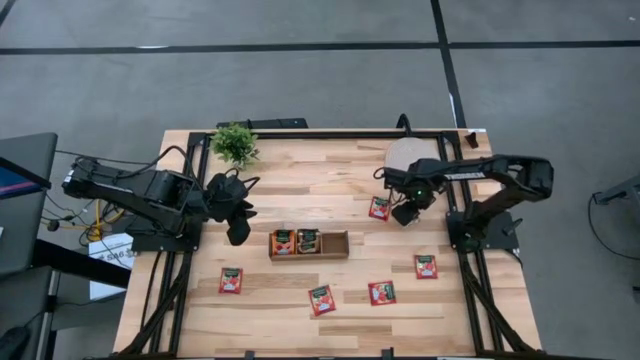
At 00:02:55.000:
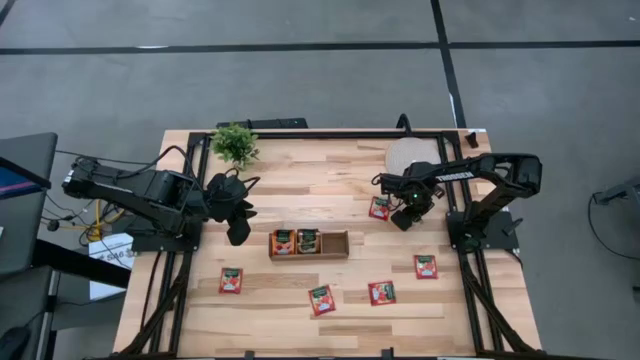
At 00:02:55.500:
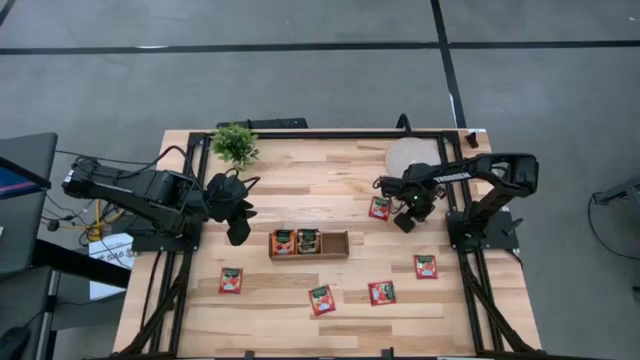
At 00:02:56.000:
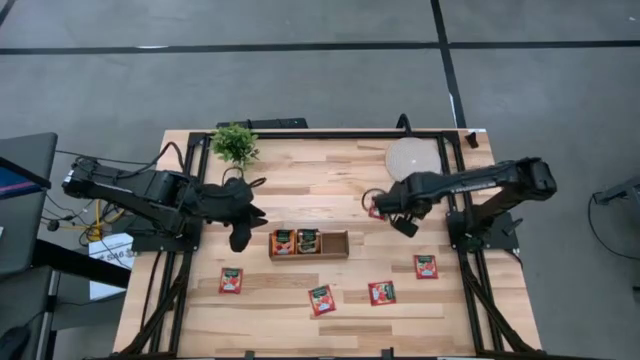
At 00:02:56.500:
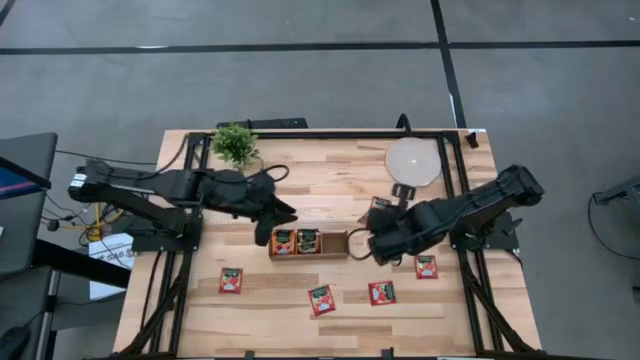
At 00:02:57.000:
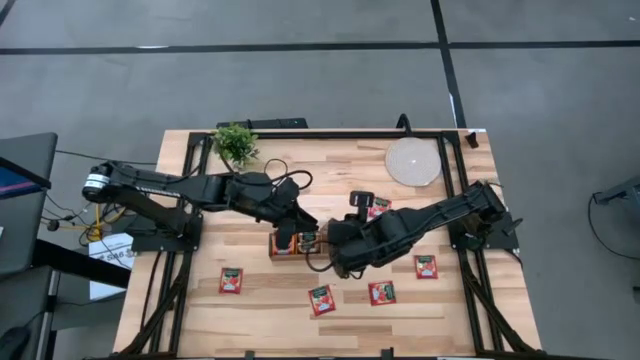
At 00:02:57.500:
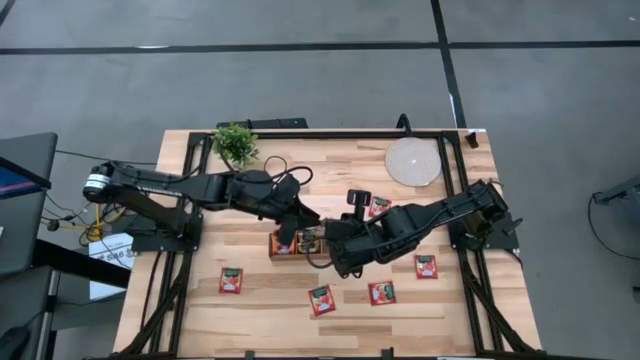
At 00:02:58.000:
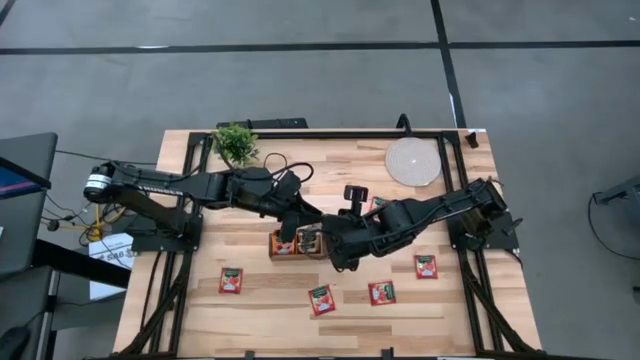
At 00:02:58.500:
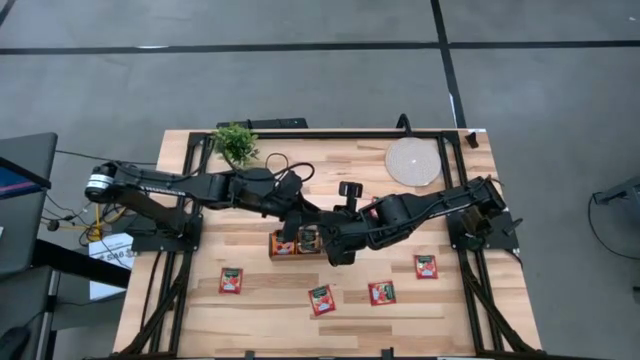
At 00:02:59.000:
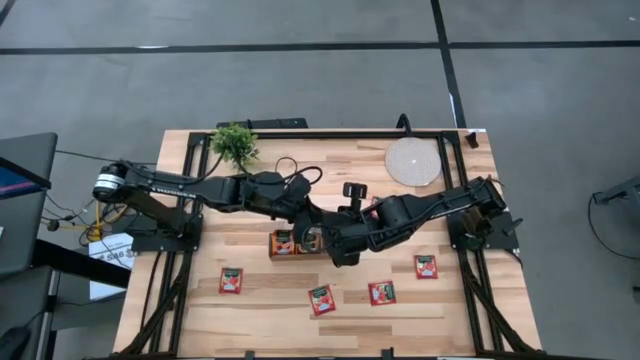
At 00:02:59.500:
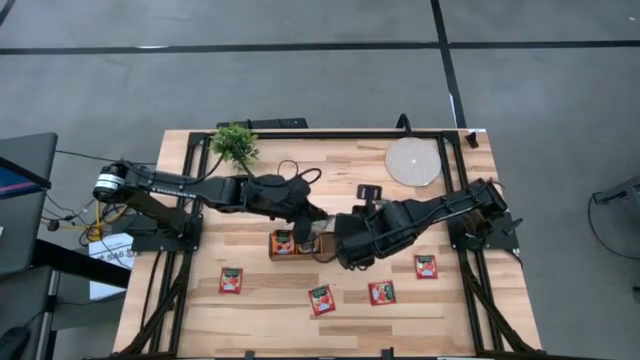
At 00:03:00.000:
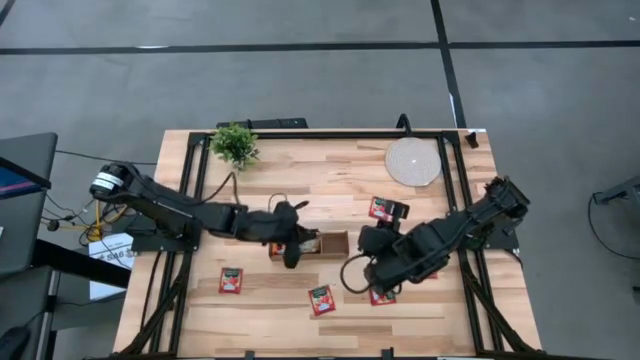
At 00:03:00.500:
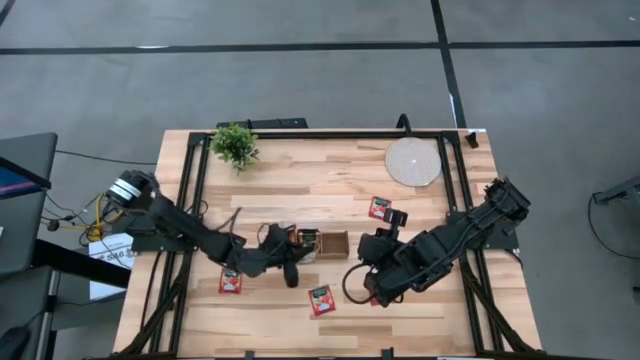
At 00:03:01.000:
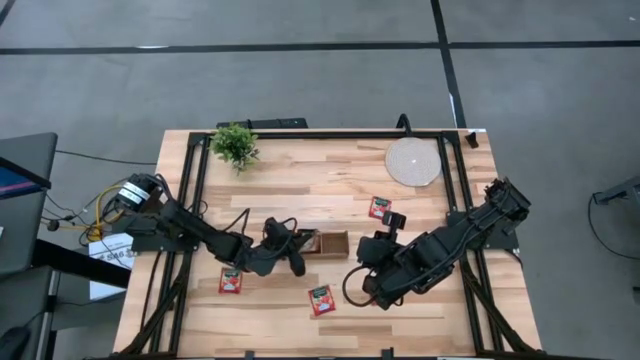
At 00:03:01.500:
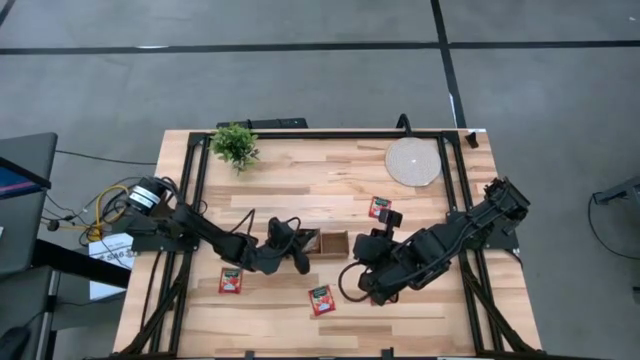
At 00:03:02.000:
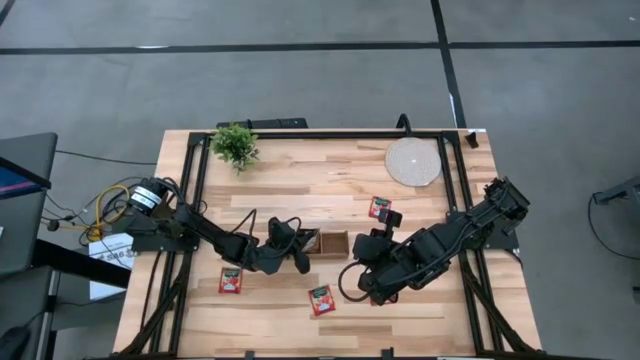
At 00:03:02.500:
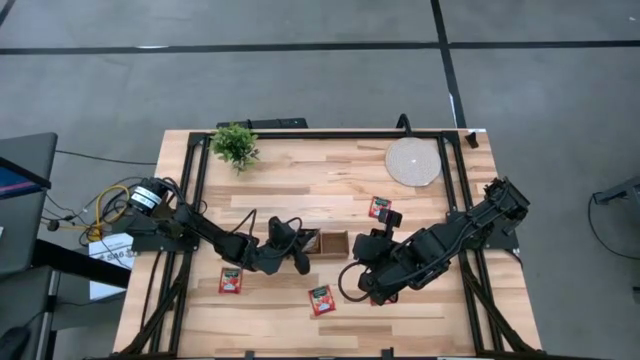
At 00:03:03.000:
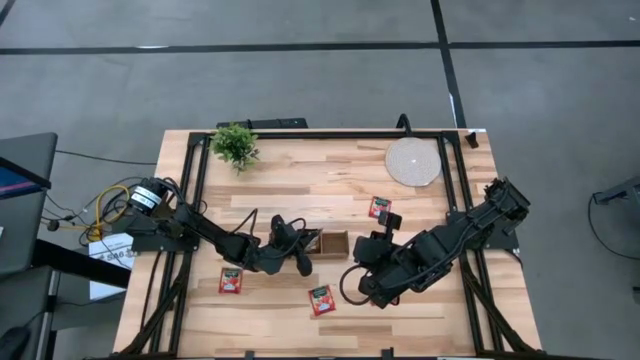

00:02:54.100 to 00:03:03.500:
Task: Pick & Place Tea
Put the brown tea bag into the middle section of the wooden organizer

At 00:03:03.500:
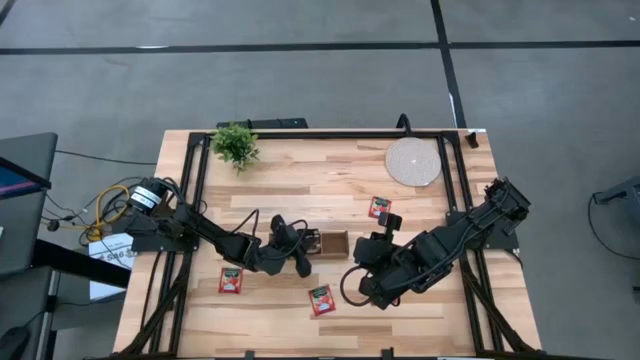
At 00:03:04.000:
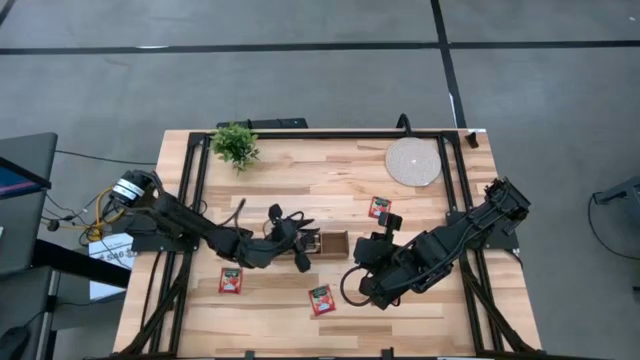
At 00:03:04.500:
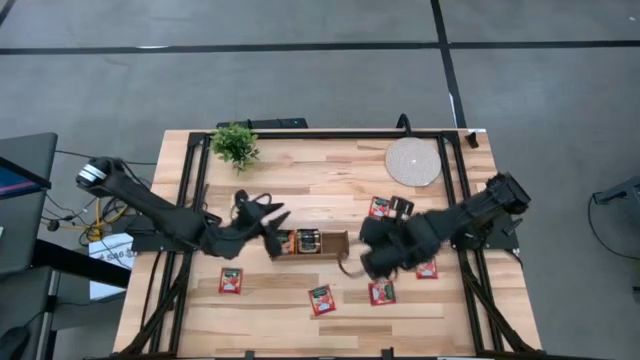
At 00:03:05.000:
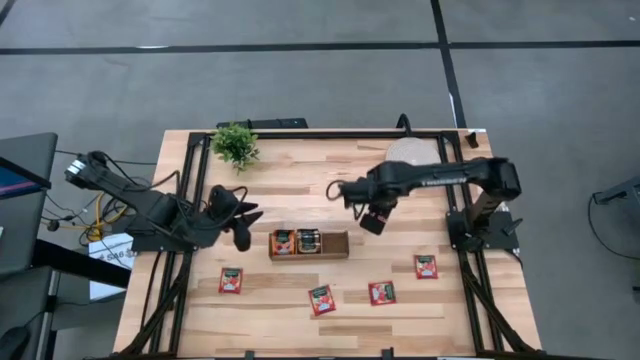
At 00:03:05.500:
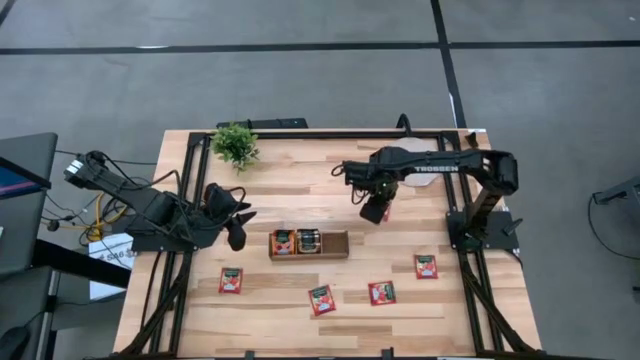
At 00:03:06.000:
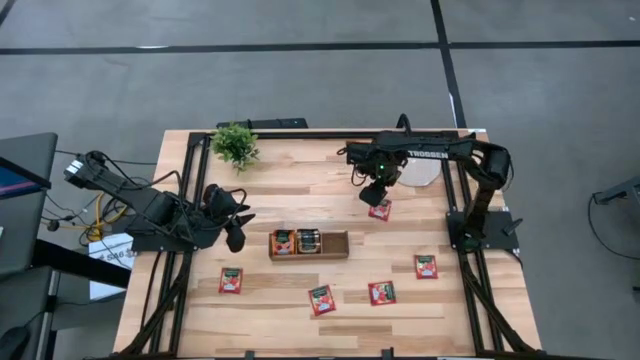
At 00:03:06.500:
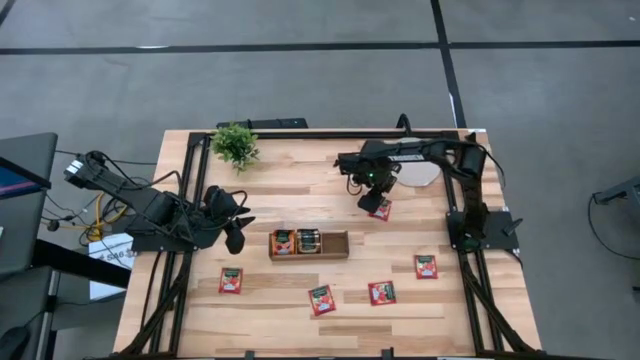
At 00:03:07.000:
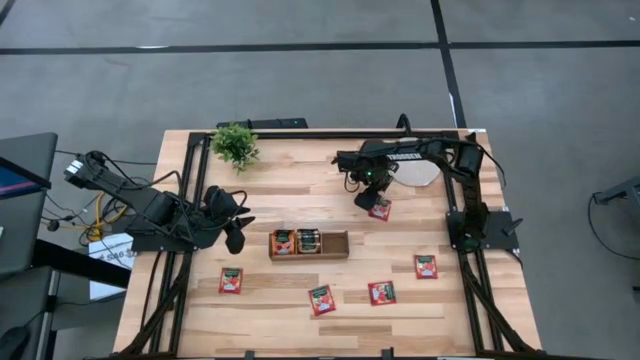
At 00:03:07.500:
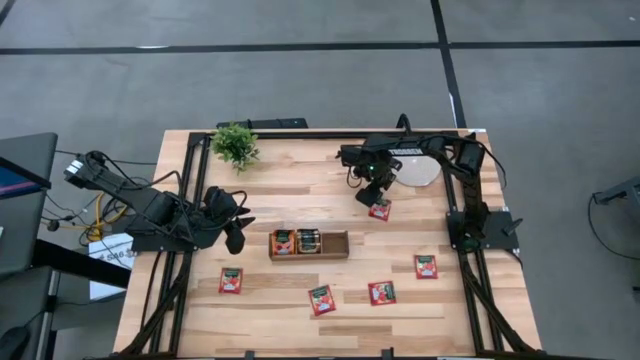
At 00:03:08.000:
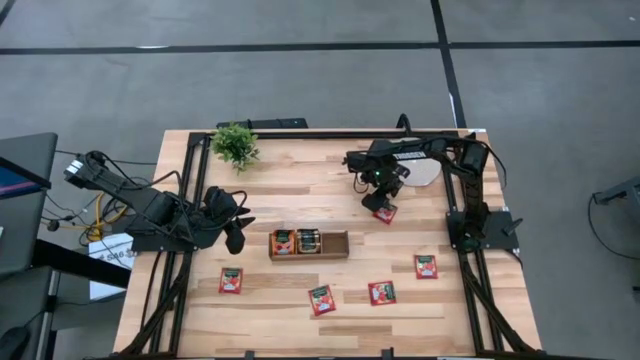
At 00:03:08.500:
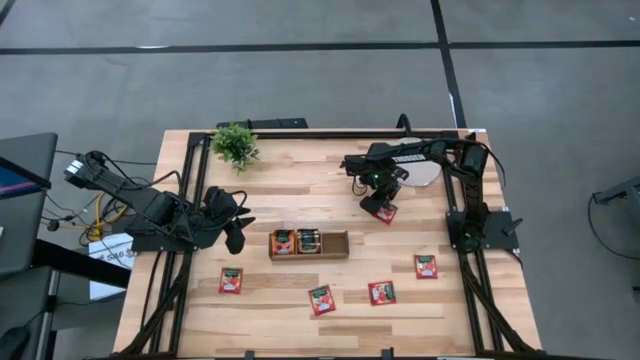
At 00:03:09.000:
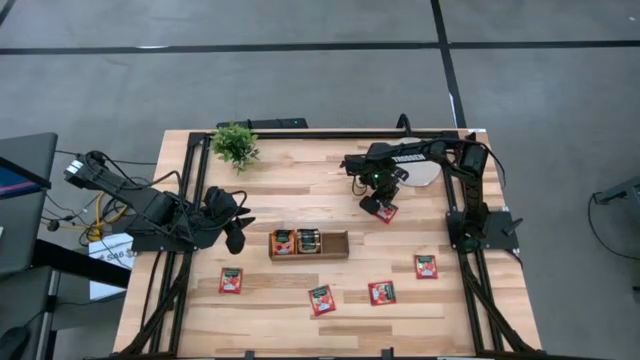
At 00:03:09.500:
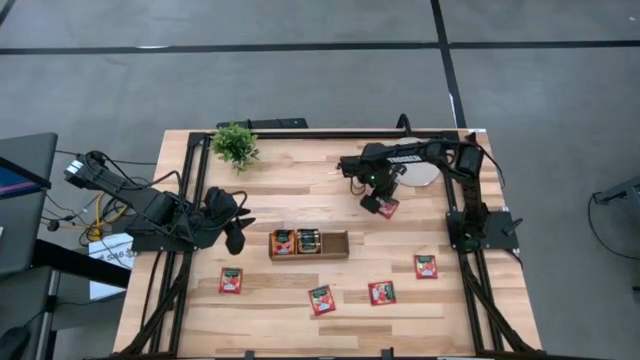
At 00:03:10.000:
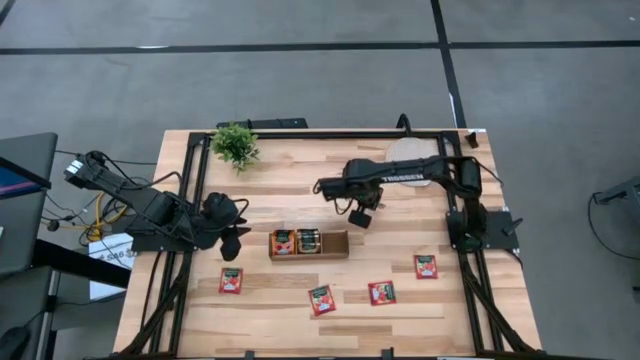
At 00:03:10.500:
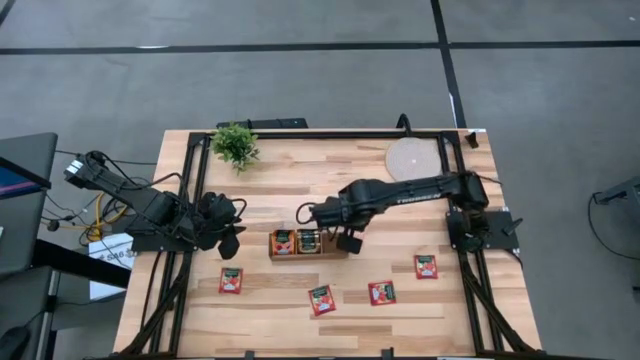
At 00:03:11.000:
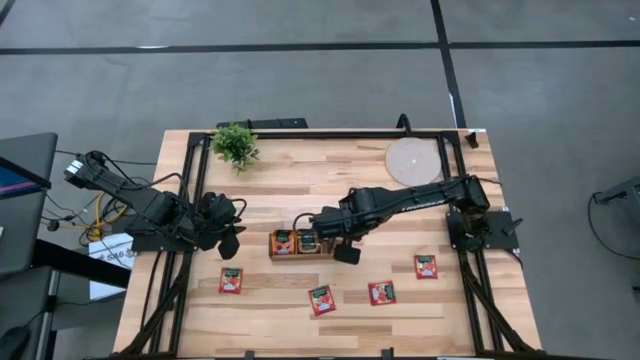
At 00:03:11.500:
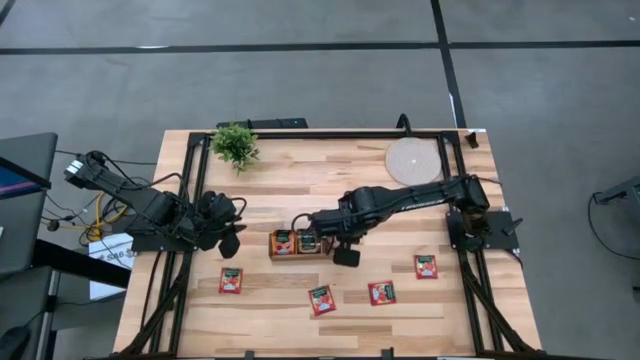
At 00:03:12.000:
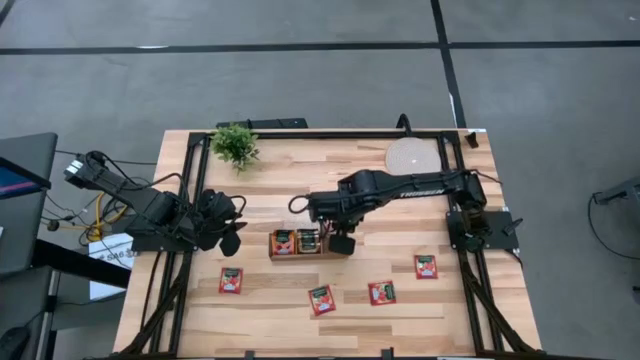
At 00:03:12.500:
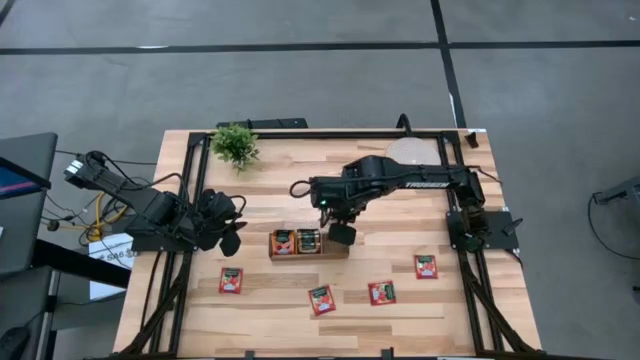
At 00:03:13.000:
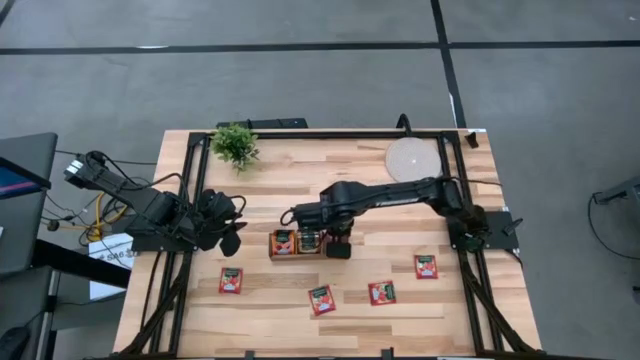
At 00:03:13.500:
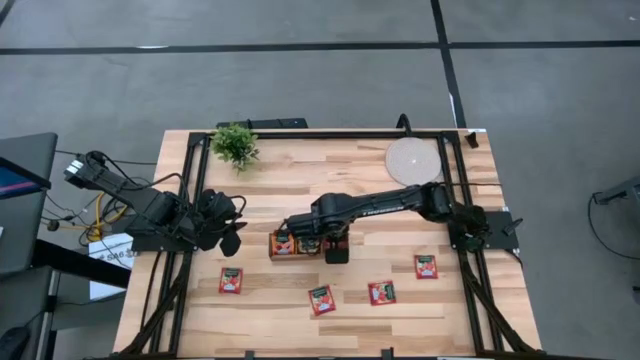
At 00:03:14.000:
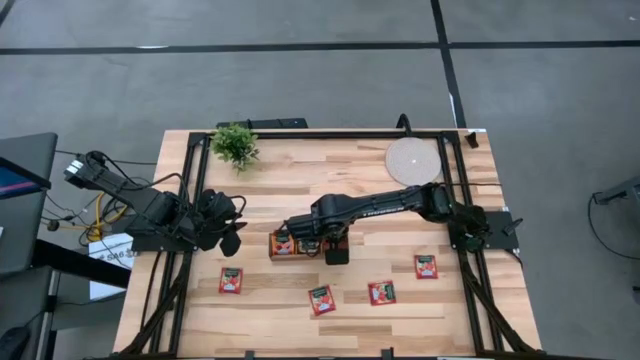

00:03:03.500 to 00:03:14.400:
Put the red tea bag into the right section of the wooden organizer
